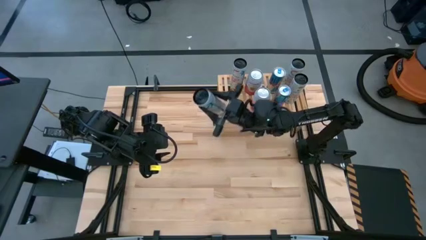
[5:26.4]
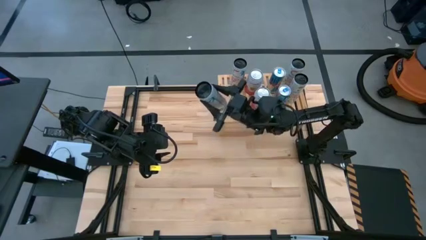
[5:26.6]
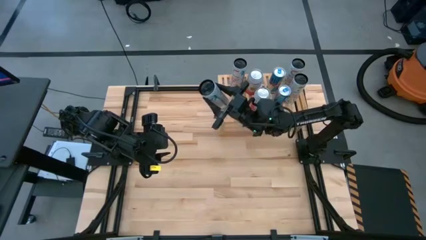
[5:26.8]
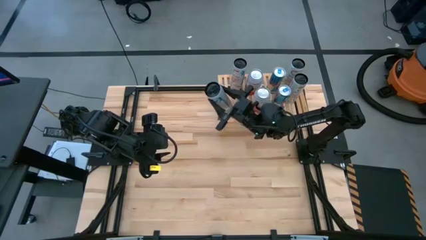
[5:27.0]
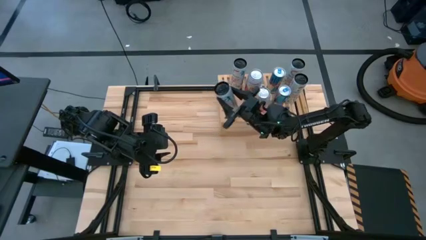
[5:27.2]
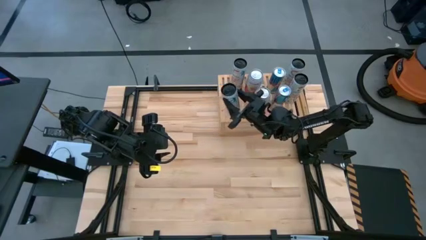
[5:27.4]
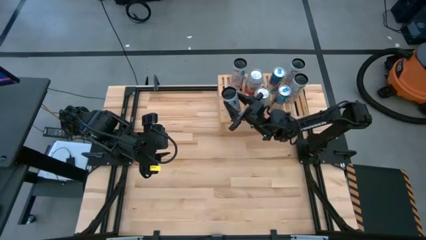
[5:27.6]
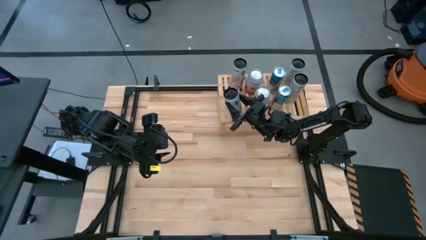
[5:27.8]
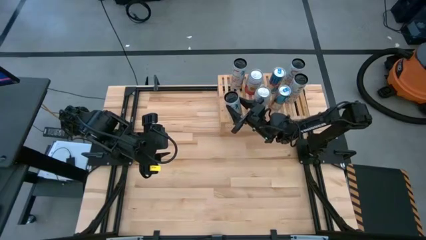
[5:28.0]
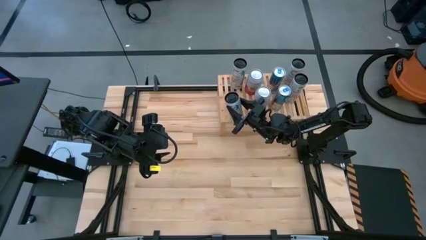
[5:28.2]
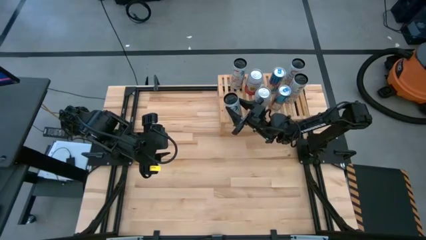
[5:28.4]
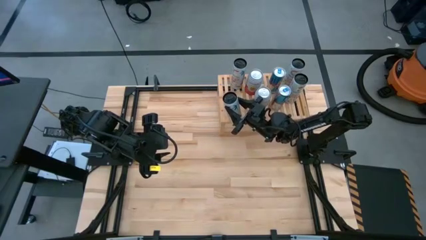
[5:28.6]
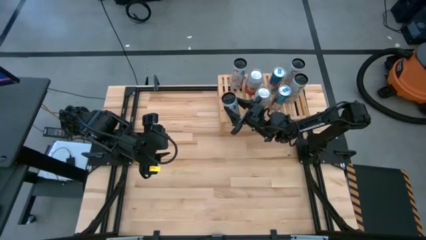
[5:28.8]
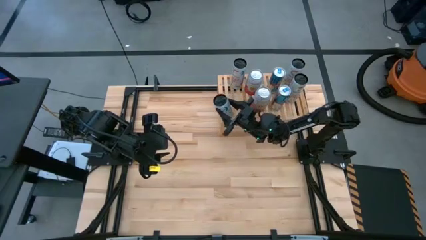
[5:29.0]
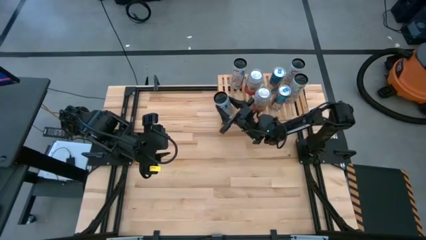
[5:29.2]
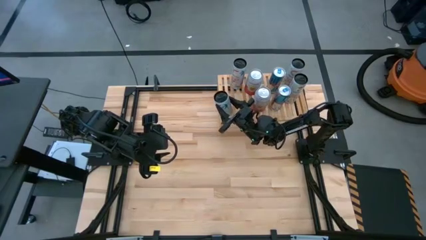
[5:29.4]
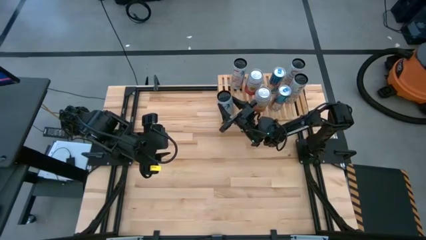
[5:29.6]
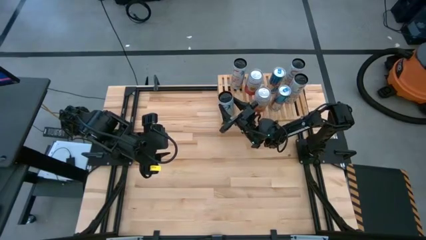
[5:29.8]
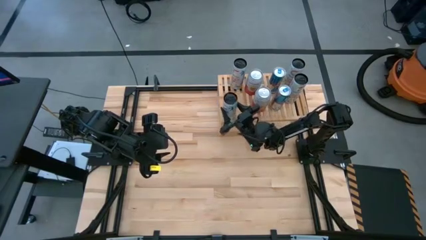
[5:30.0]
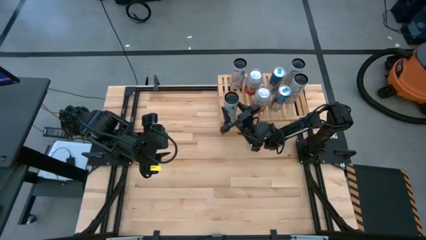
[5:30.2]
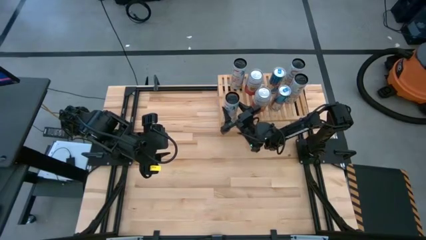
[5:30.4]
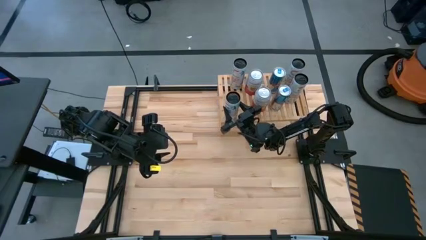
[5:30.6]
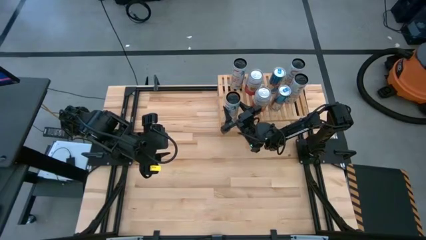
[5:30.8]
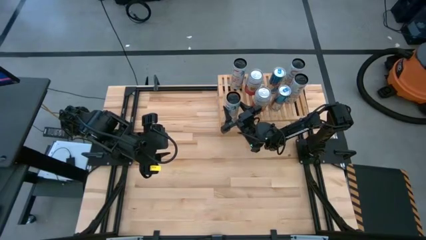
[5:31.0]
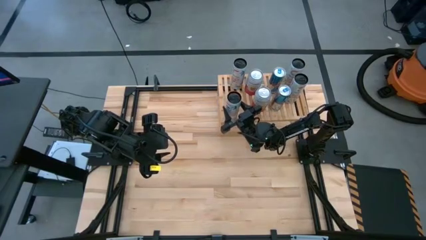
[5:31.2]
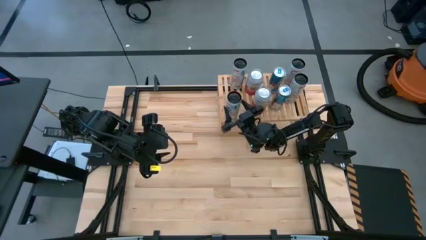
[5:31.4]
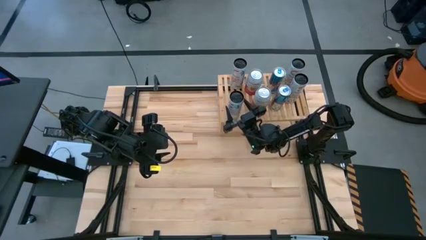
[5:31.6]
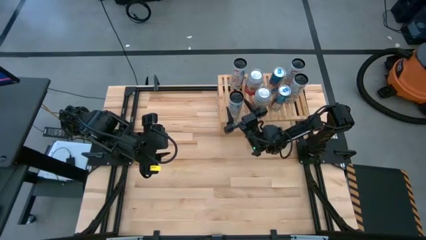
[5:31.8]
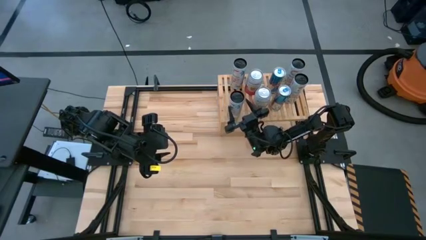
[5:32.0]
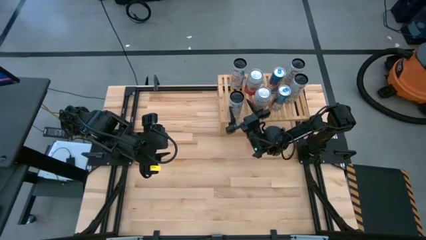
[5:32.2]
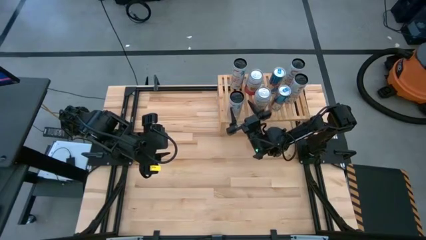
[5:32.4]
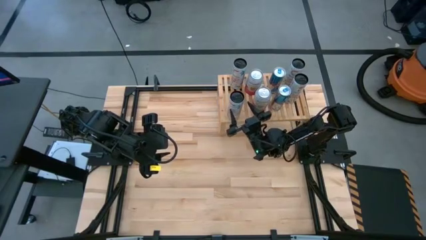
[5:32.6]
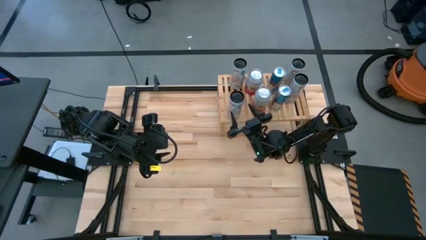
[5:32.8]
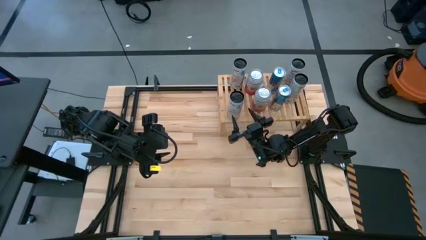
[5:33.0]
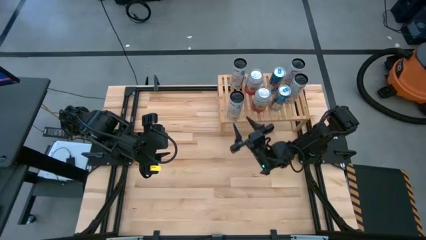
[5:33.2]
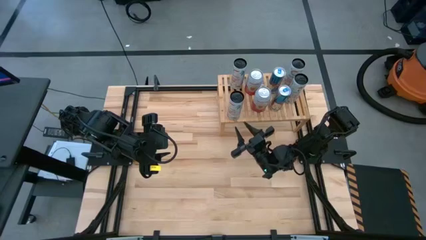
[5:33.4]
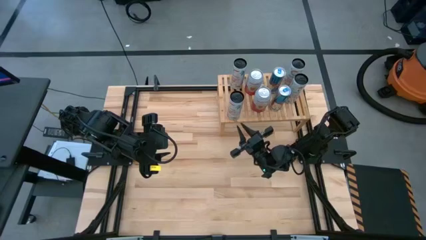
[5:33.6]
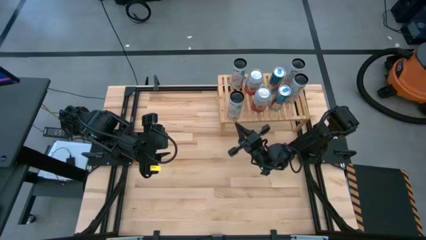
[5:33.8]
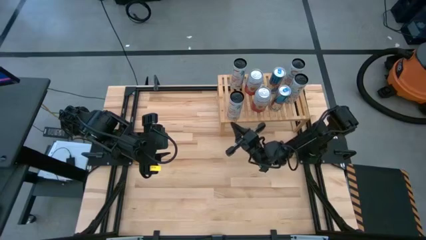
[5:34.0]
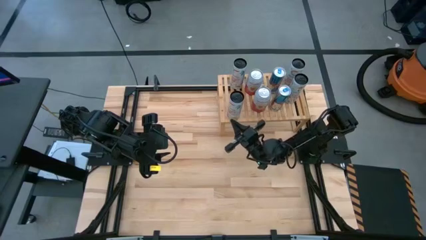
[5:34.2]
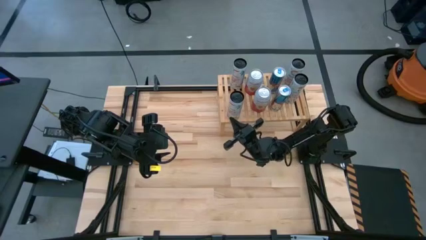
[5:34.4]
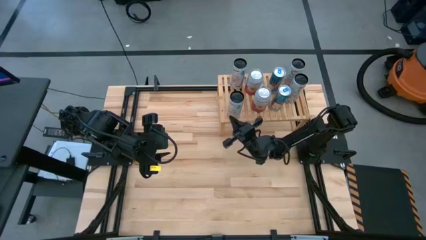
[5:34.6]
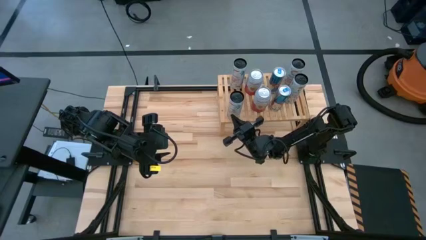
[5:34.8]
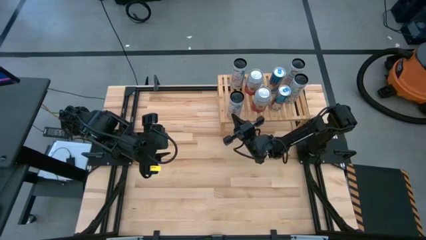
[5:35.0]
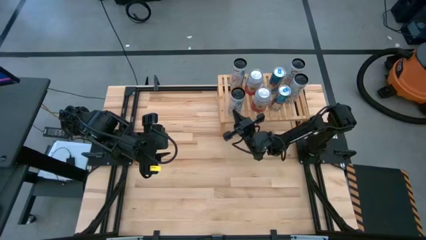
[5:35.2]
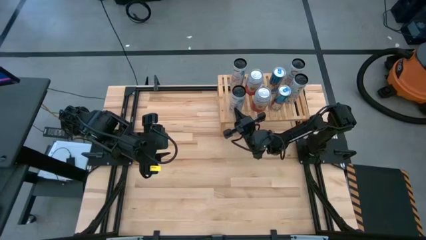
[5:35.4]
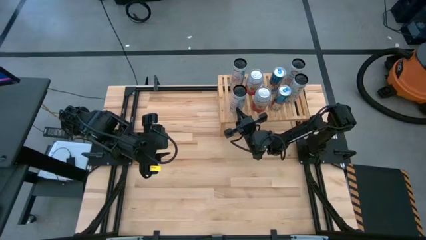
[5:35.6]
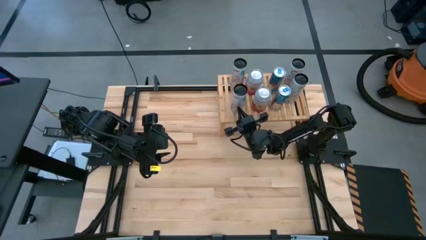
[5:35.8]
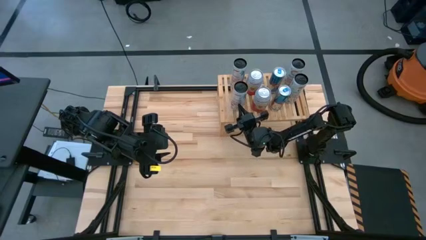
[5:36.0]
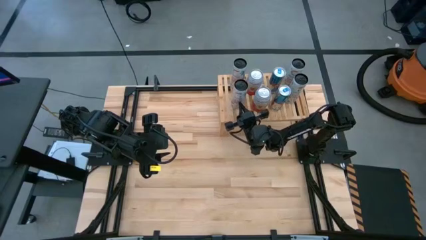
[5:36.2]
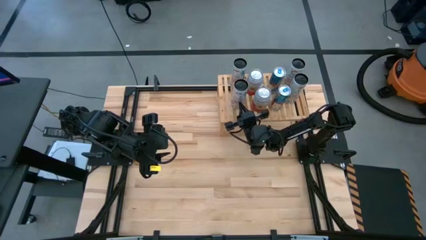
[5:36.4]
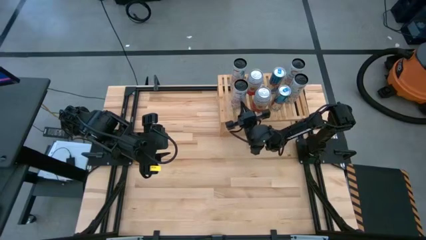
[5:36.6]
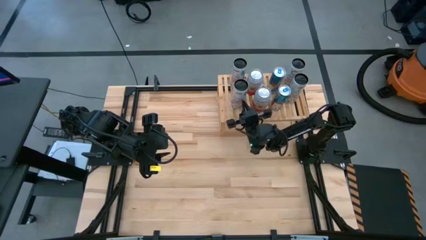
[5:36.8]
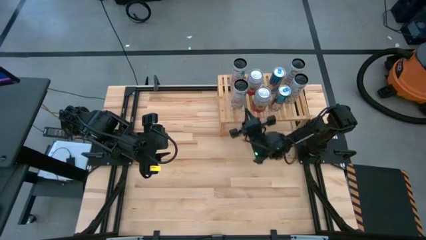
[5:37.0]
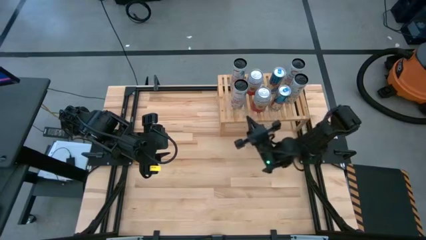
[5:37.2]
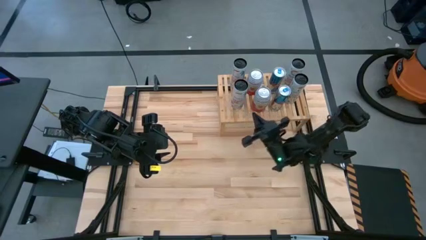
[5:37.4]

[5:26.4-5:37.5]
Task: Place canned beverage on shelf
Put the white-pink soda can on the shelf aligned with the other white-pink soda can
